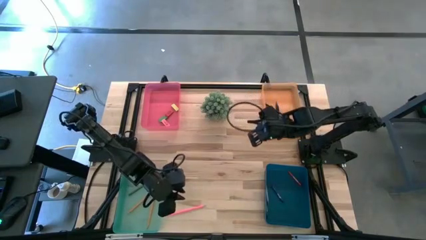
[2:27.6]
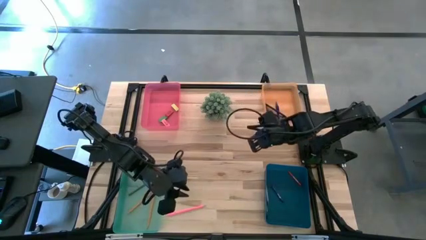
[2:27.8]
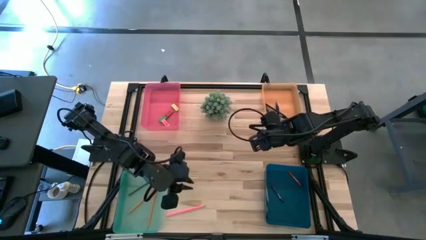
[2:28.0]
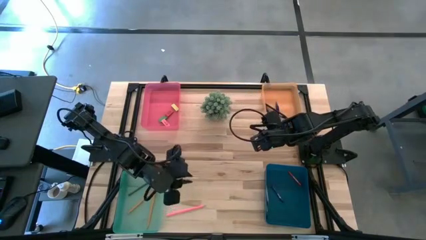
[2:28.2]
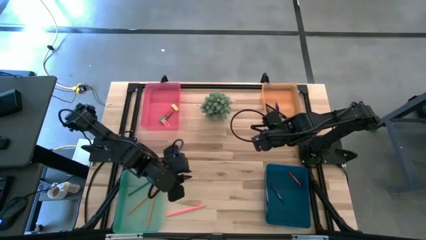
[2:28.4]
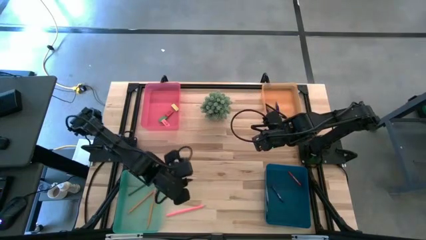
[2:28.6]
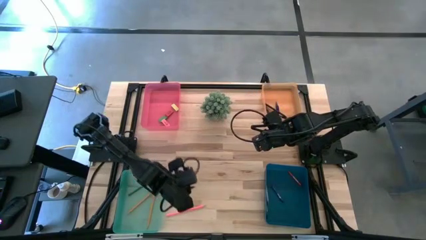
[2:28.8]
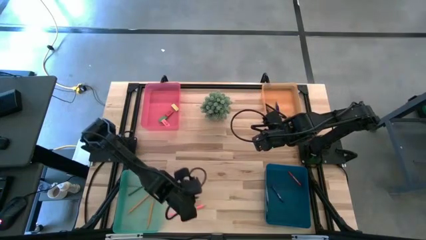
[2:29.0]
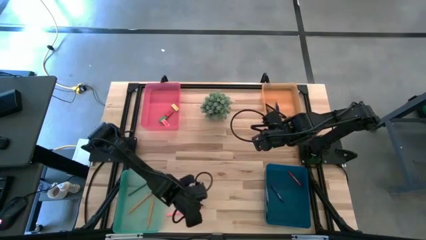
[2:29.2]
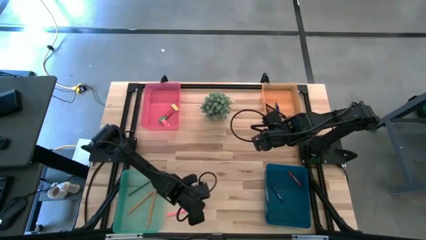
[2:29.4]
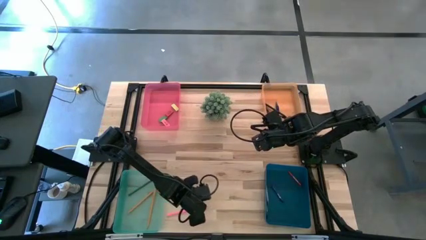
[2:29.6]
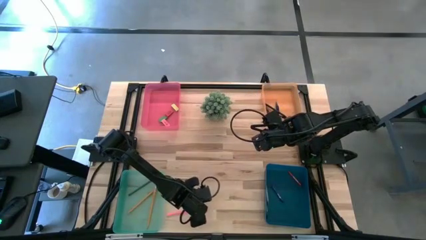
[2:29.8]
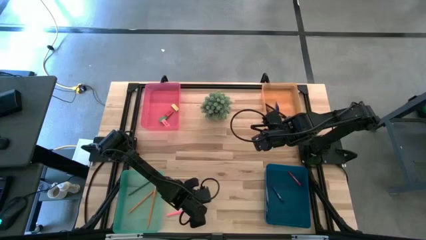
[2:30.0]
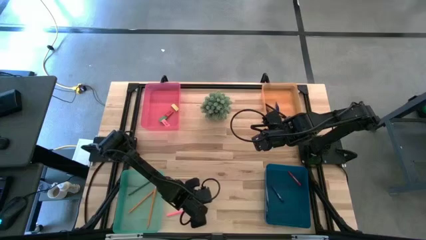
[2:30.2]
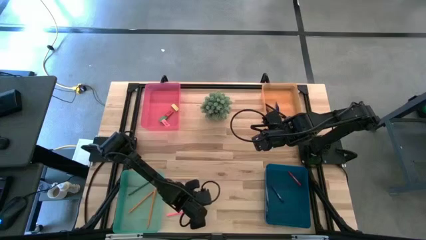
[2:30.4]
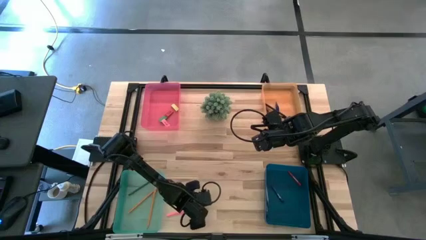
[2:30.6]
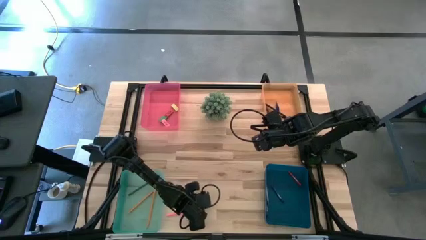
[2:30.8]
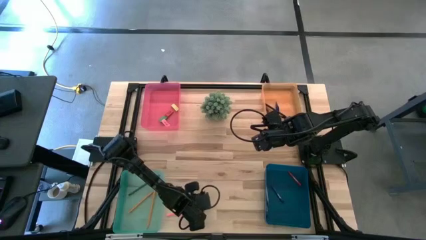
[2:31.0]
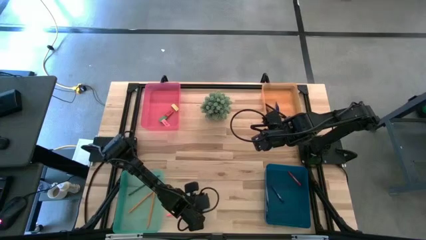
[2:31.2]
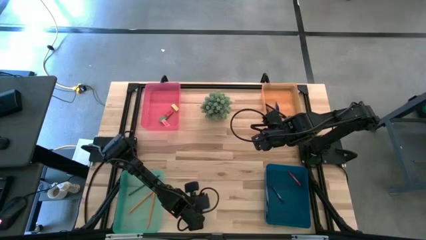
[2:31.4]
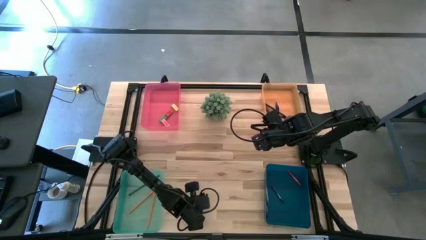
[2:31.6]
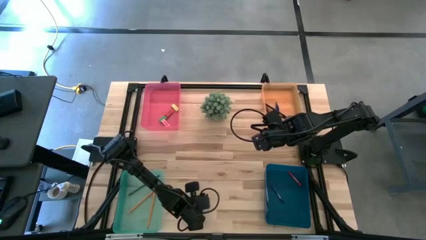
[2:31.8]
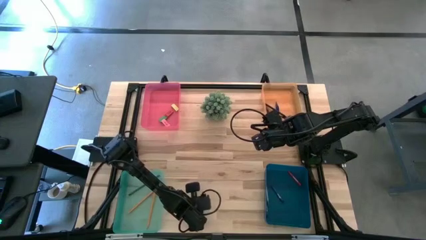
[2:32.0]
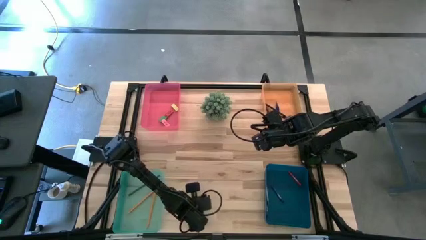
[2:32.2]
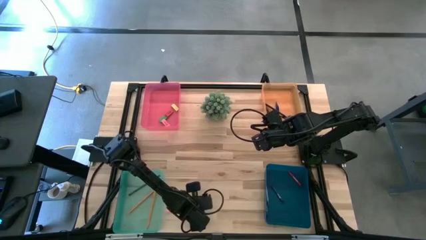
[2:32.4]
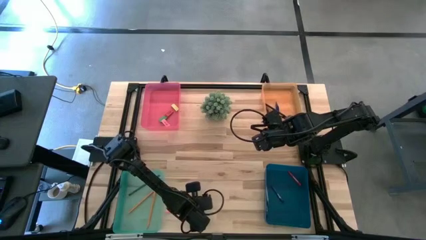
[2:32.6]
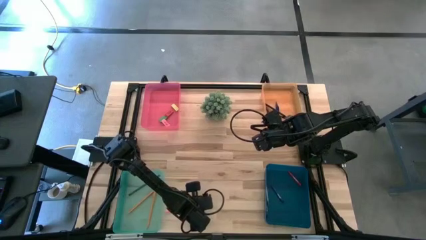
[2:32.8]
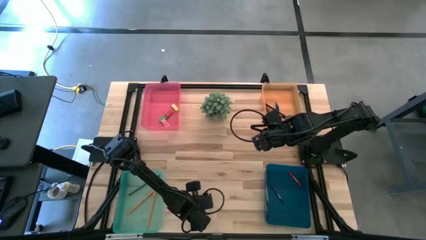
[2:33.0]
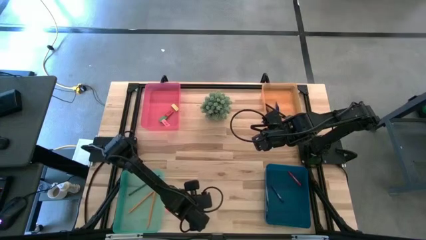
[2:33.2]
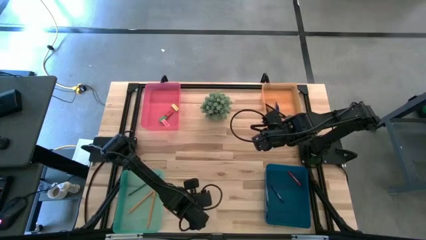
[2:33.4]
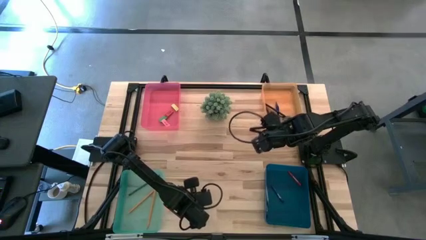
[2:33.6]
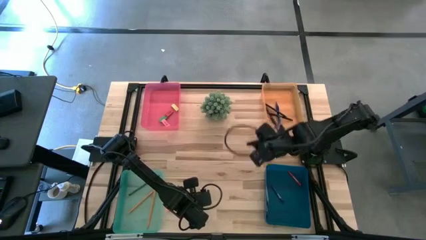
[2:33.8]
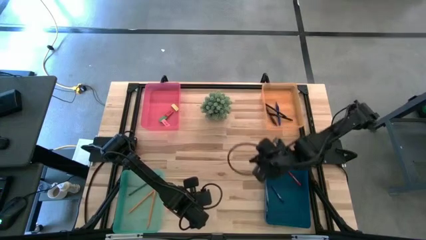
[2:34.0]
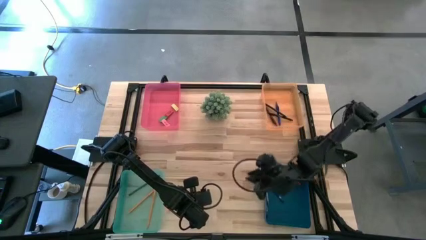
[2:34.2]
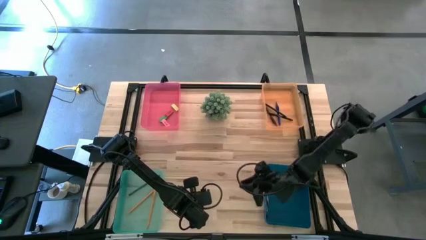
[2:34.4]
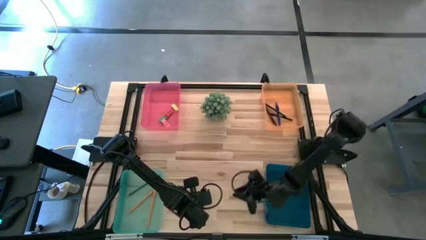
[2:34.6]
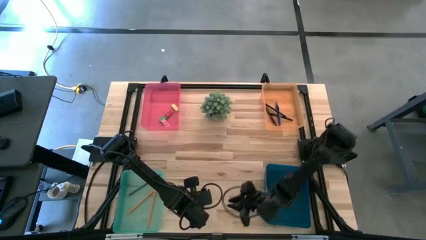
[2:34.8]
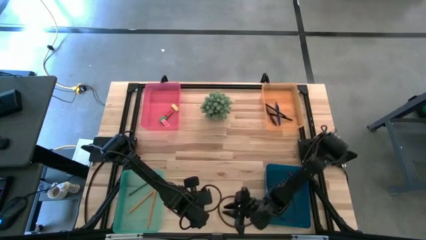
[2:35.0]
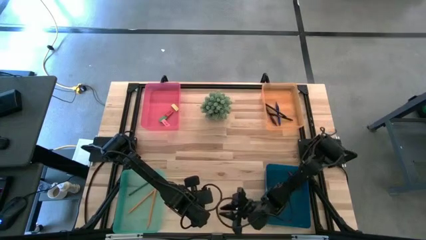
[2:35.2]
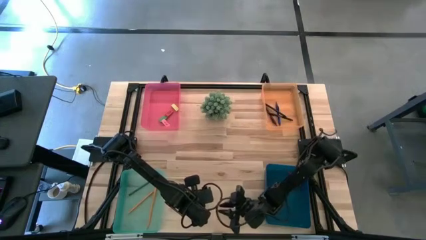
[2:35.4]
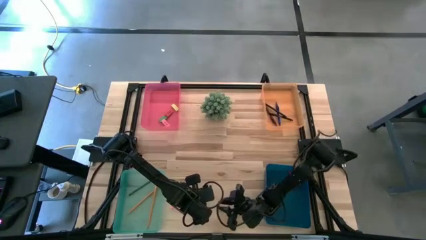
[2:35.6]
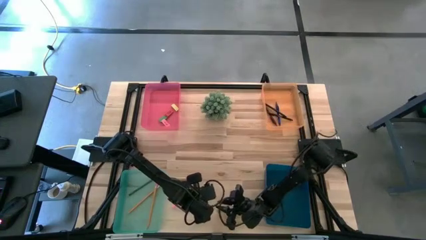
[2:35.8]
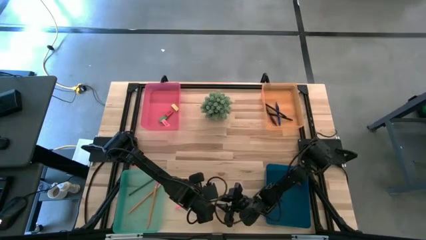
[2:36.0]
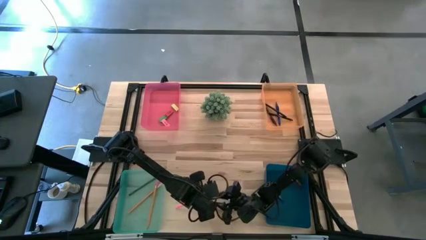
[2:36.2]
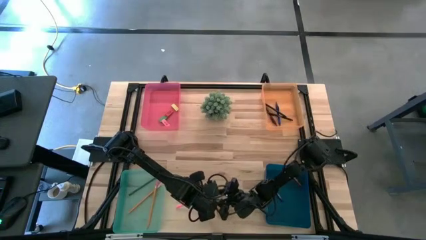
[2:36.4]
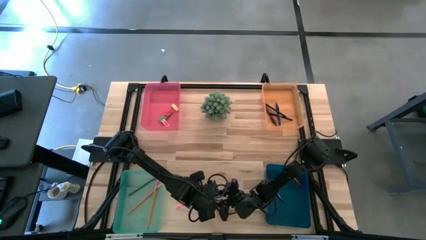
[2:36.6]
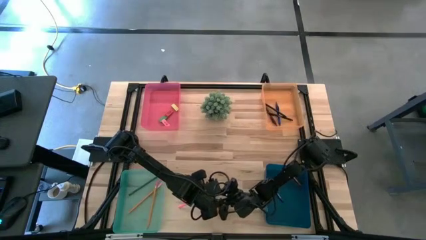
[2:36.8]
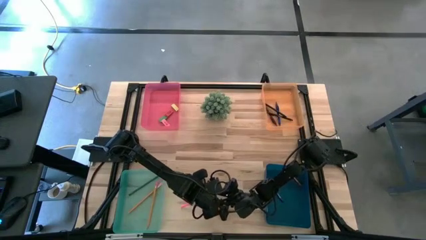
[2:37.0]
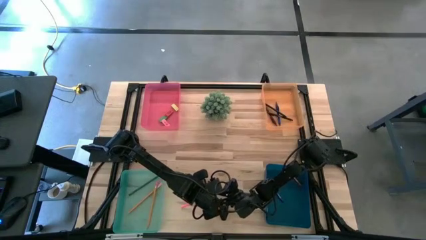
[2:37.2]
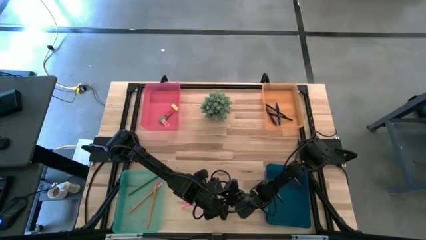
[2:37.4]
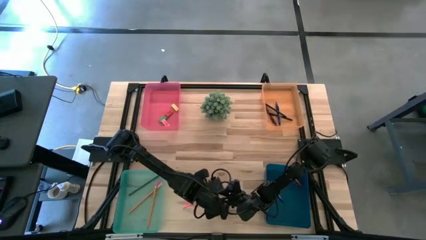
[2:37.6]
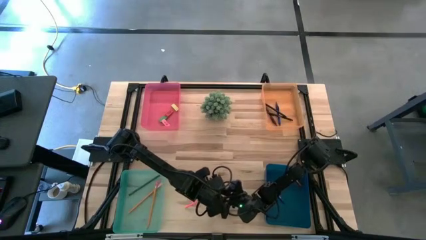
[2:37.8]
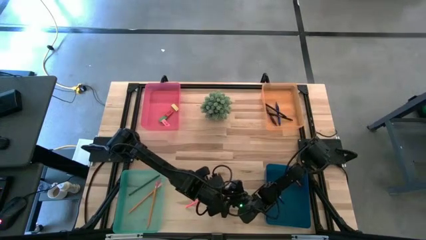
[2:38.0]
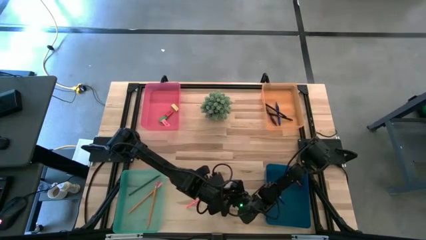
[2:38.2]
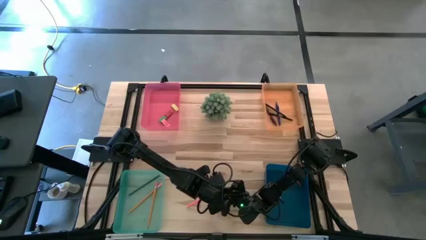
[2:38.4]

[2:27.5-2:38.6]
Task: Sort crayons/erasers/pens/pencils in bins
Put the pink pencil into the green bin
